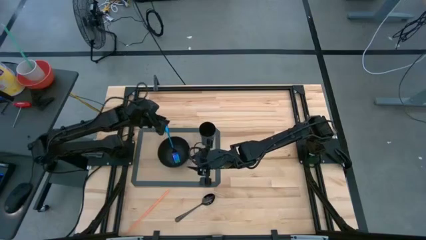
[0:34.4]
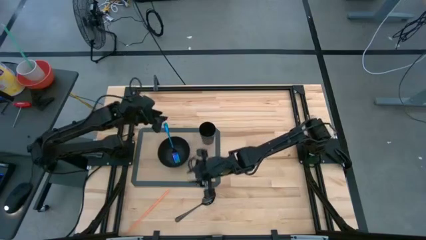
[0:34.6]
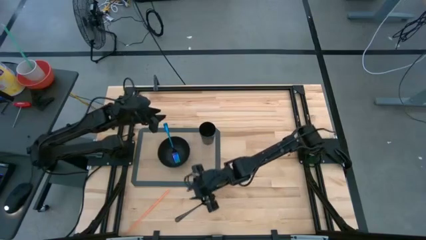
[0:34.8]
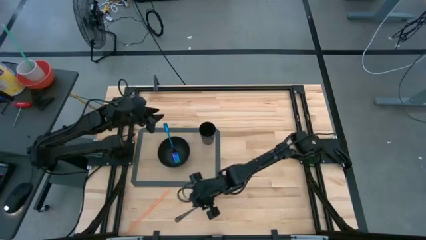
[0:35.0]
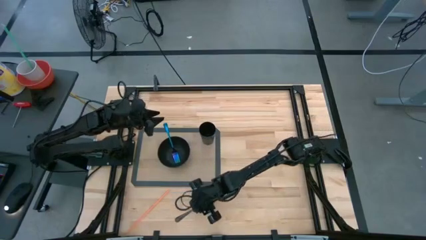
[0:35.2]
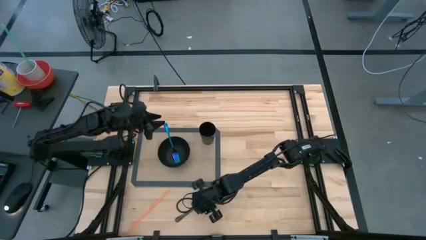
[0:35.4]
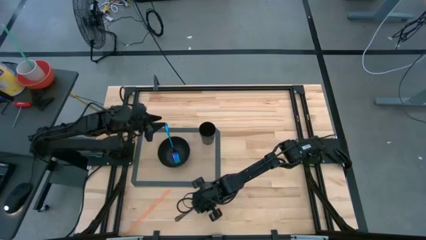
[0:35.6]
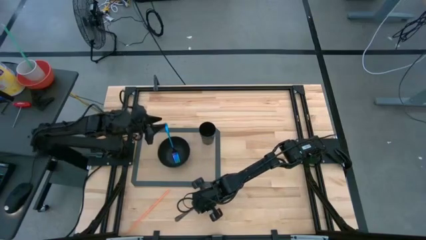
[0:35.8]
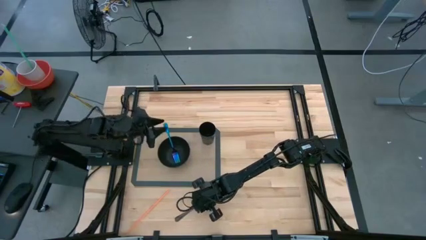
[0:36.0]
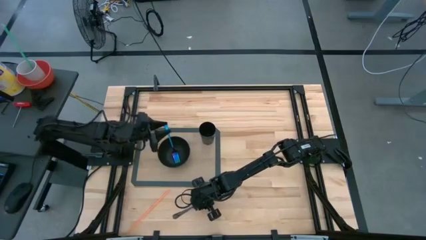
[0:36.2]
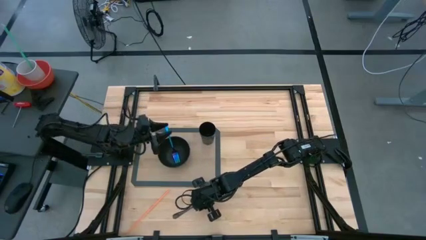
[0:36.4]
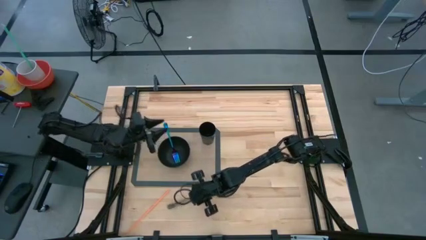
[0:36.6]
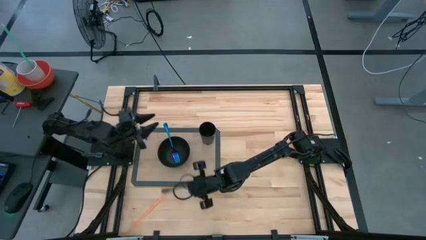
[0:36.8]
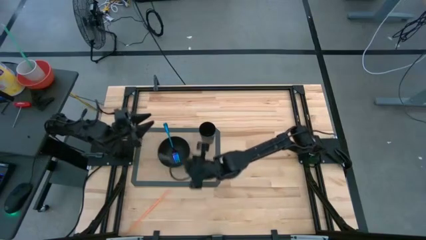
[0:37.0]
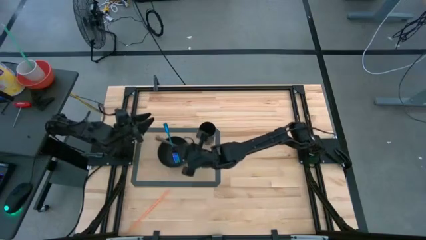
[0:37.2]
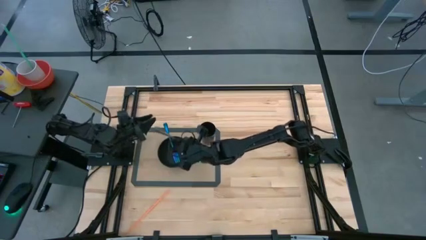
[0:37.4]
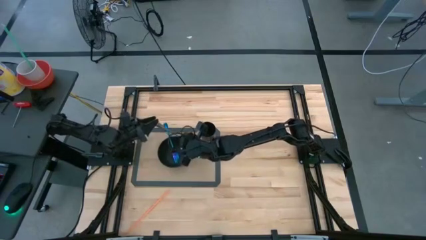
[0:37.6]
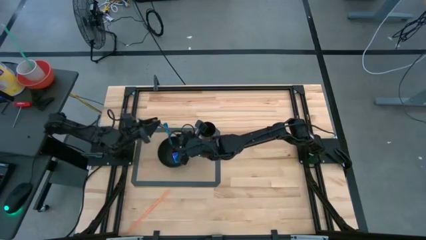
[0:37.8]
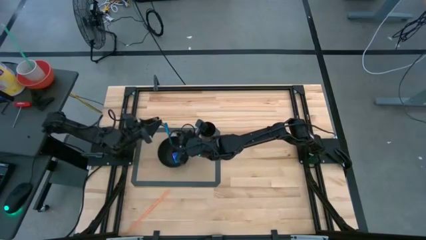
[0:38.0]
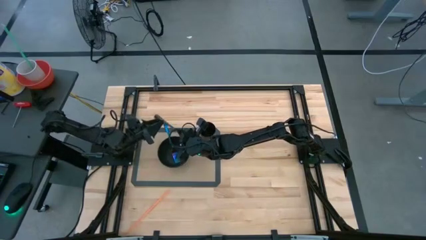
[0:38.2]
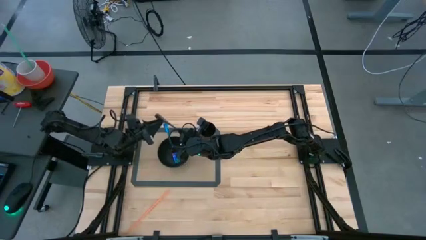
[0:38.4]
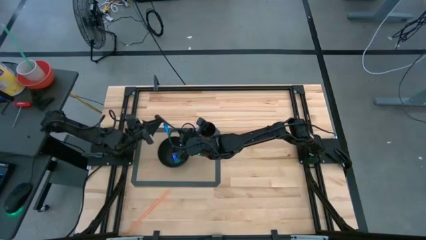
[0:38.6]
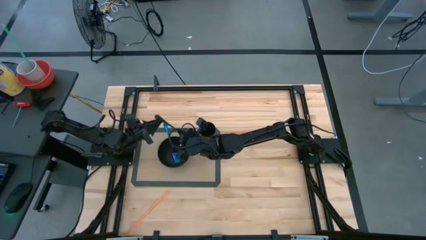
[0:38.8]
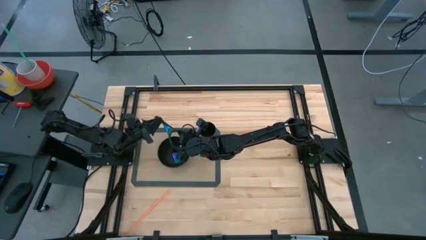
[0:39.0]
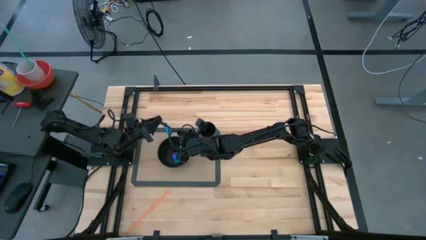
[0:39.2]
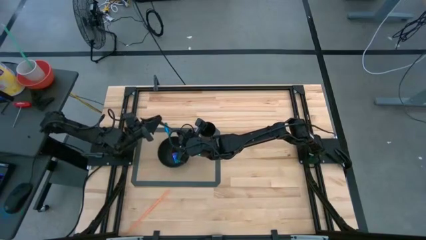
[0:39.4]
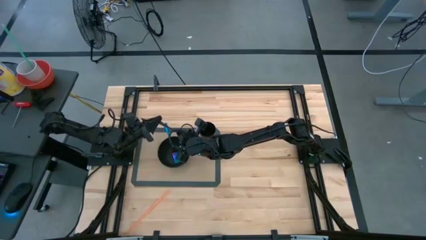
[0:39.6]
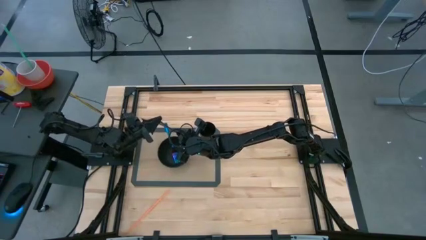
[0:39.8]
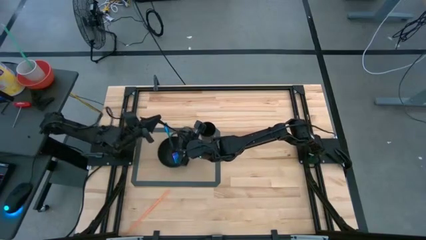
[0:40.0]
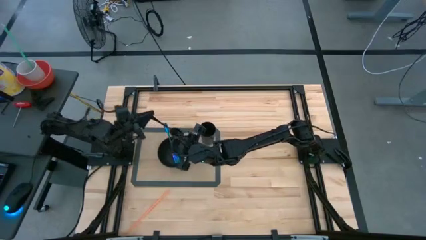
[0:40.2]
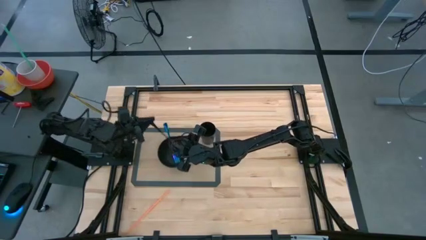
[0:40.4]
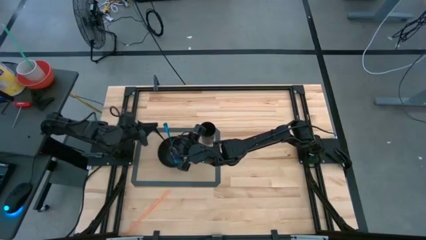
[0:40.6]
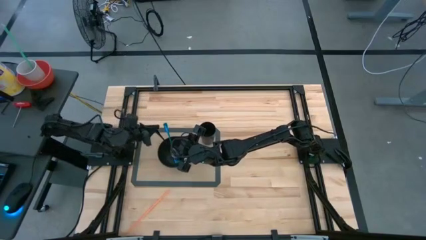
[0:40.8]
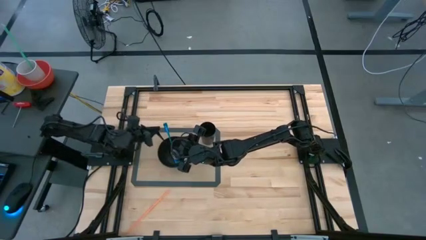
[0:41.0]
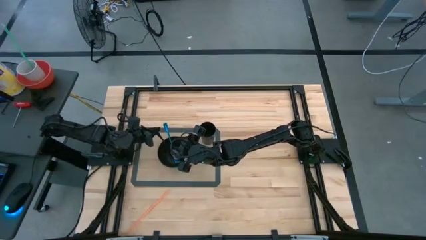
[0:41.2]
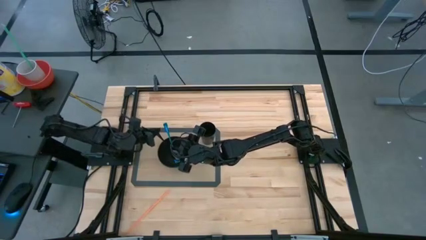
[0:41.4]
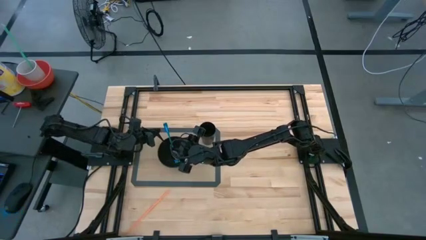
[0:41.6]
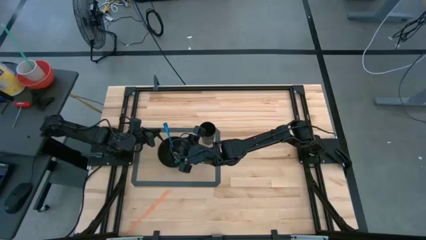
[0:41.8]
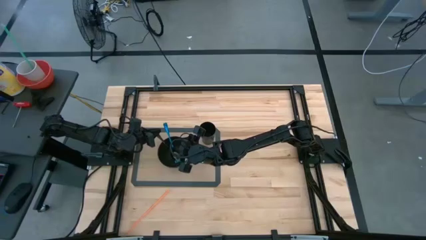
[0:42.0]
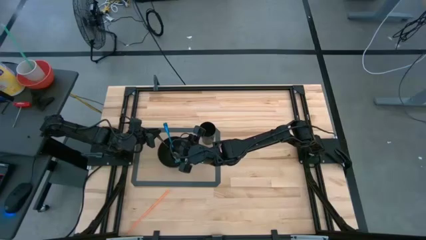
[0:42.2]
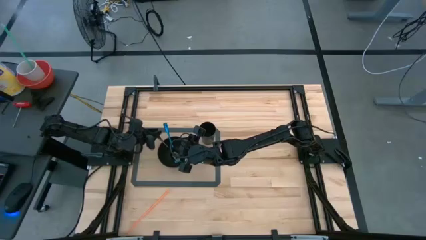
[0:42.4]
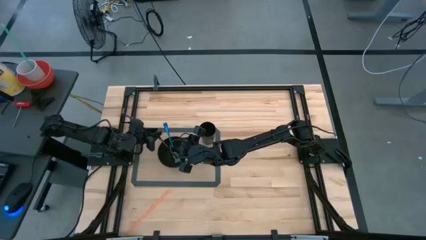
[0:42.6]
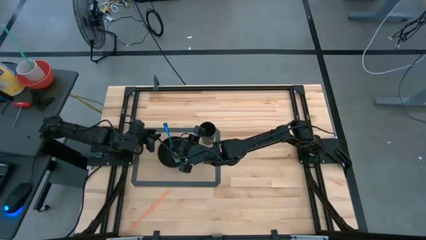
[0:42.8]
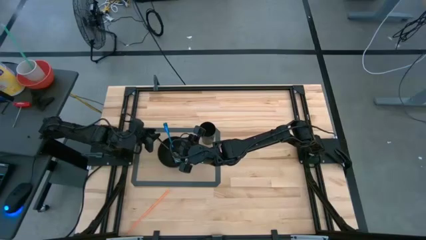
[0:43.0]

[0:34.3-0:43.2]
Task: Pick & Place Utensil
Put the black spoon into the black bowl

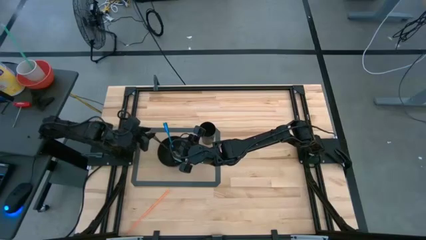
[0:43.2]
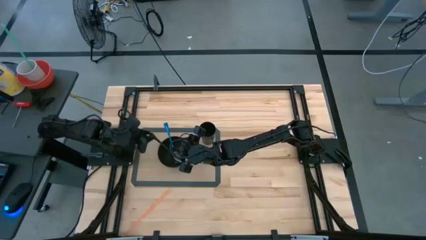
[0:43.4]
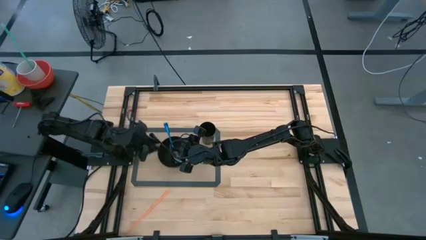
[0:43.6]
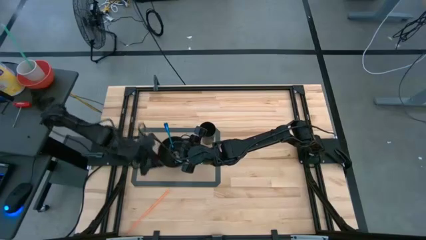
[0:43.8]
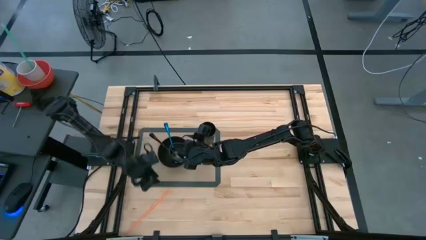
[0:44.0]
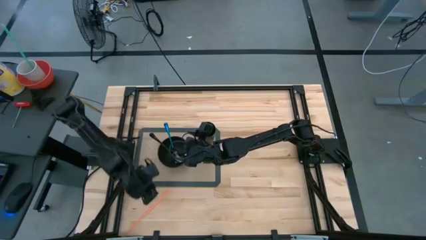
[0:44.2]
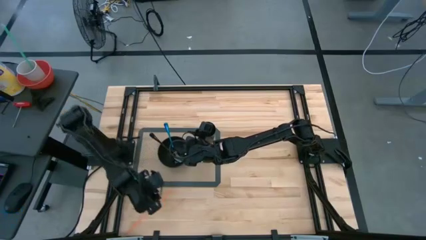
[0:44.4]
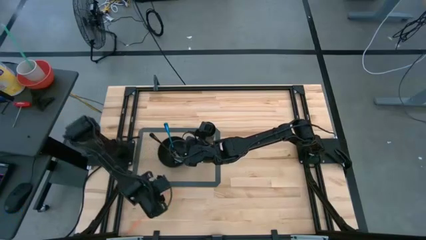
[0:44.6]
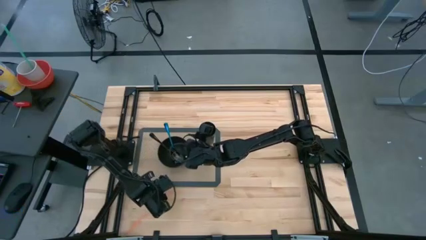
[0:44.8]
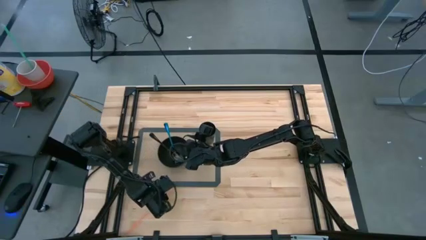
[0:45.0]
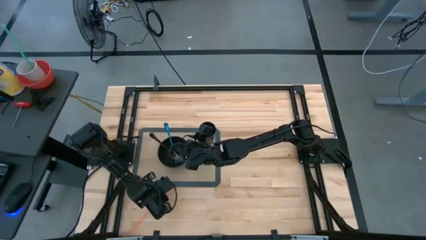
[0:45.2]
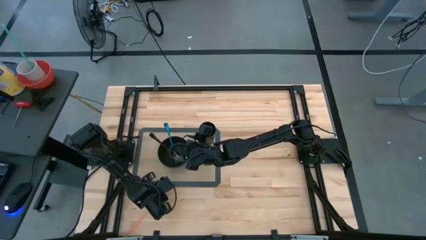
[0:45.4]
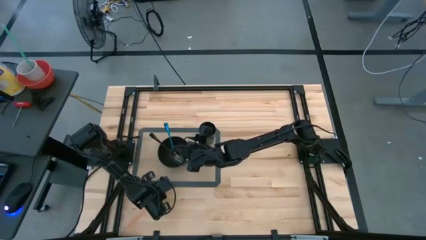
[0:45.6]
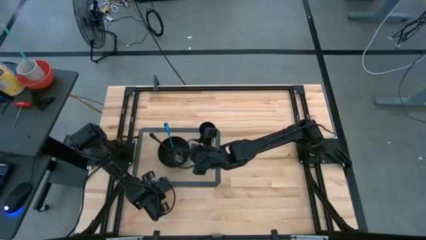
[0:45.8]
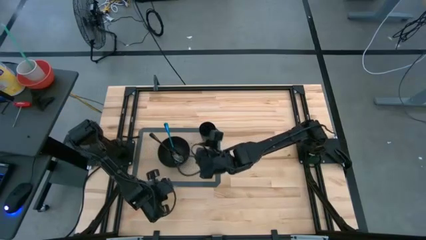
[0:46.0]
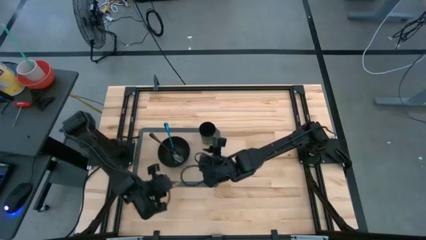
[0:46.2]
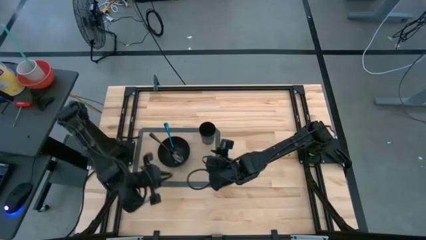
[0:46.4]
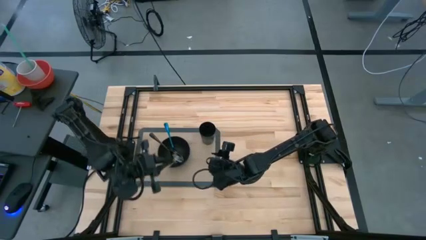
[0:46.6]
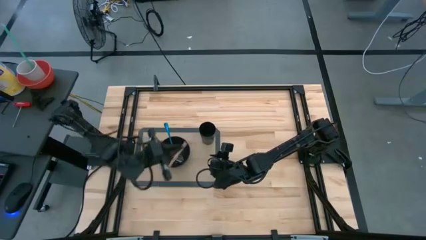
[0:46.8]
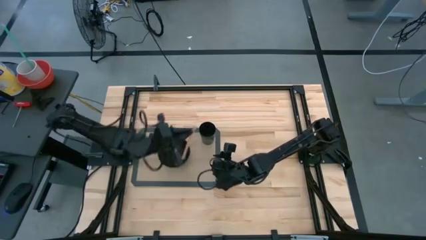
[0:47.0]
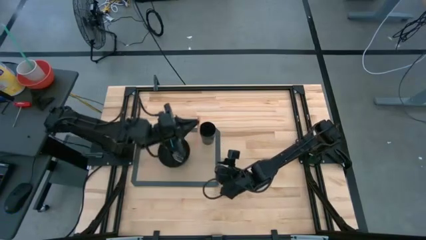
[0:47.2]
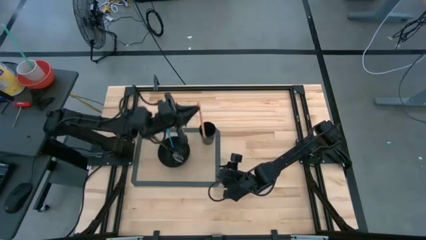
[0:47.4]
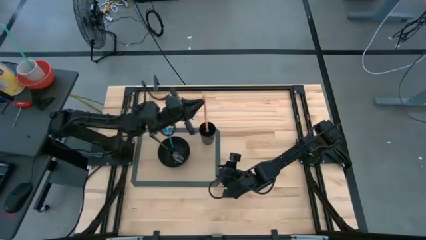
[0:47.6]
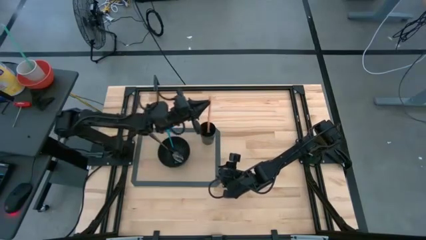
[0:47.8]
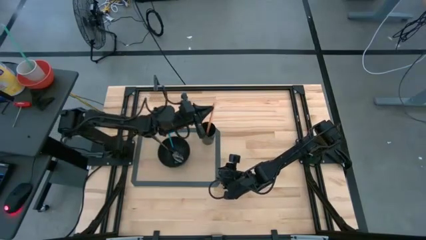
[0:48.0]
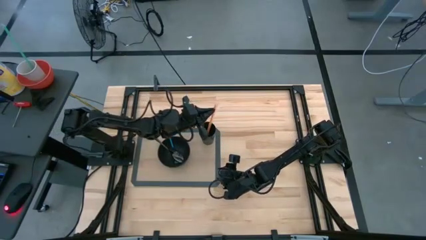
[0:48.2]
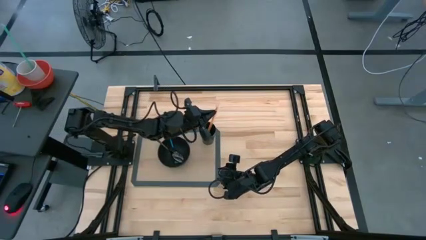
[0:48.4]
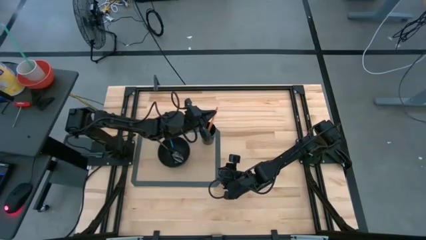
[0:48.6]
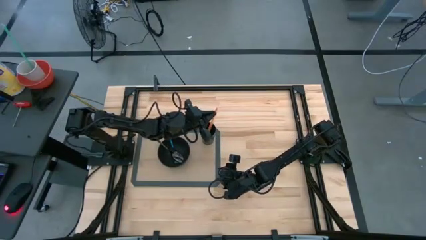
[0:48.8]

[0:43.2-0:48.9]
Put the orange straw into the black cup
